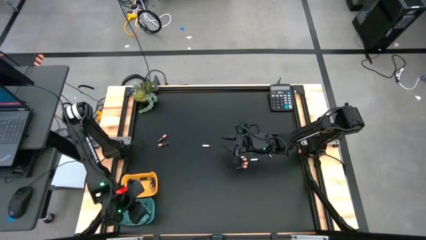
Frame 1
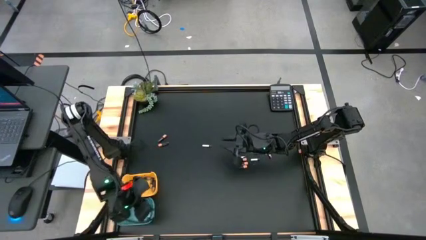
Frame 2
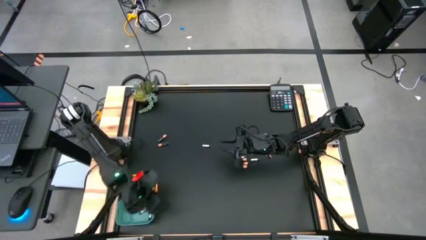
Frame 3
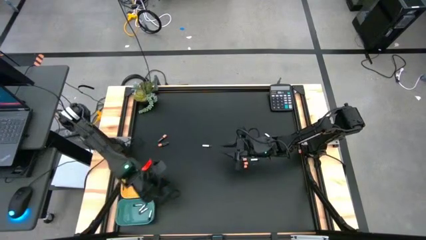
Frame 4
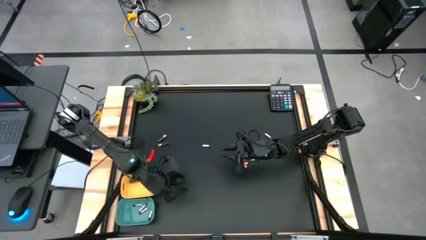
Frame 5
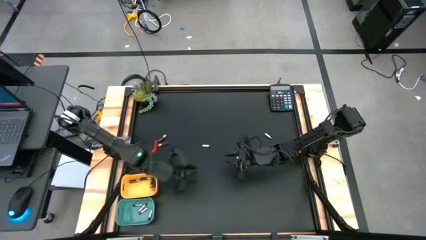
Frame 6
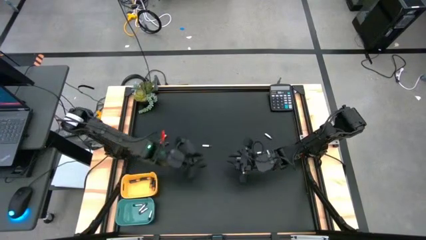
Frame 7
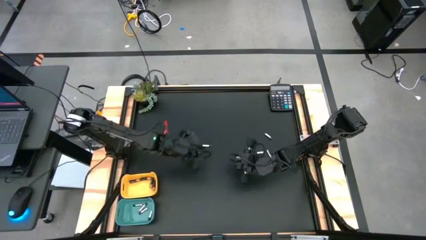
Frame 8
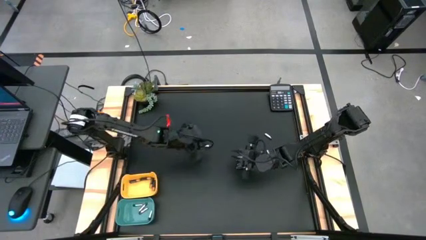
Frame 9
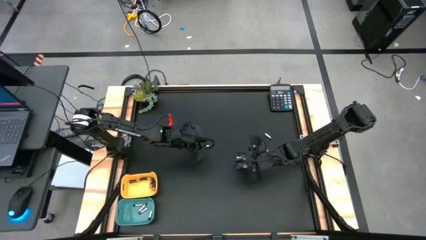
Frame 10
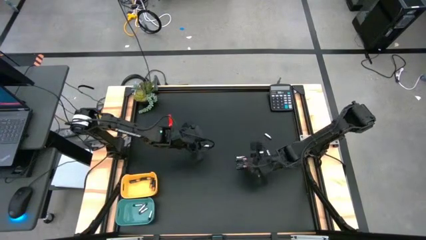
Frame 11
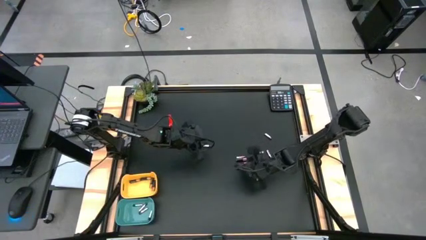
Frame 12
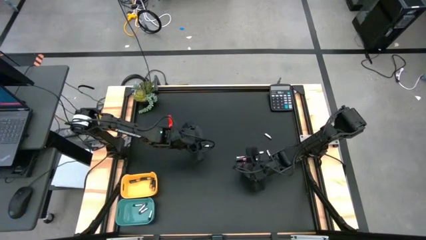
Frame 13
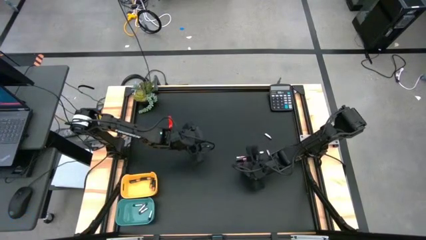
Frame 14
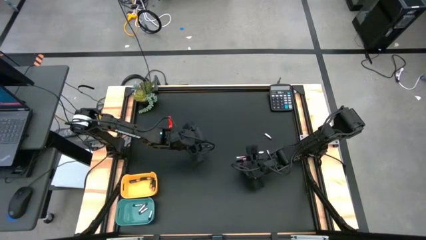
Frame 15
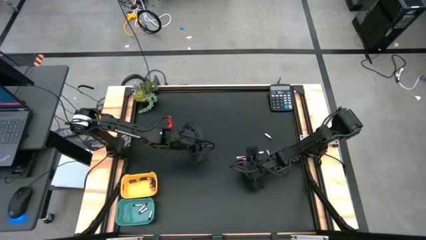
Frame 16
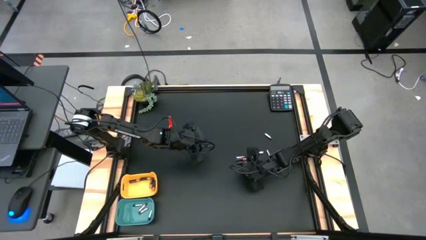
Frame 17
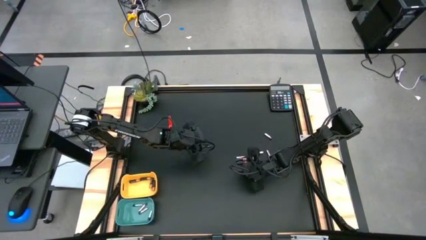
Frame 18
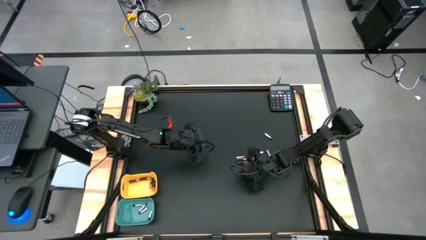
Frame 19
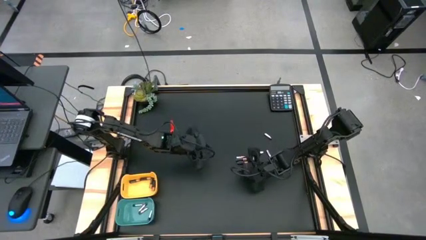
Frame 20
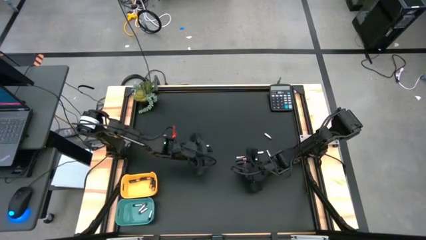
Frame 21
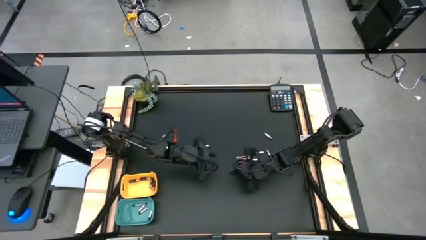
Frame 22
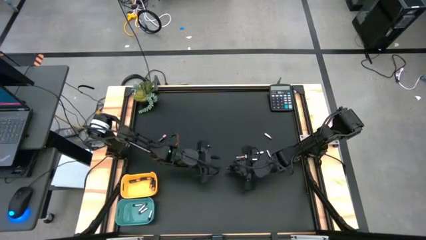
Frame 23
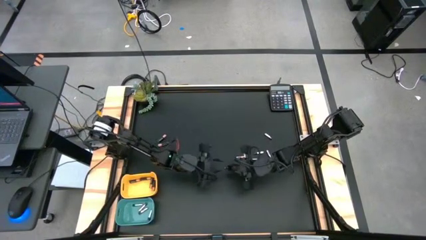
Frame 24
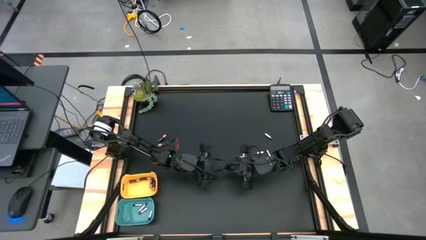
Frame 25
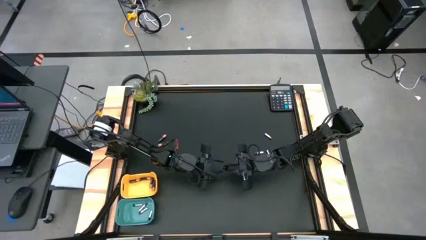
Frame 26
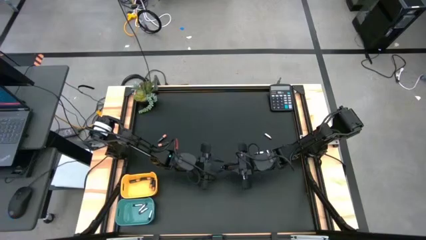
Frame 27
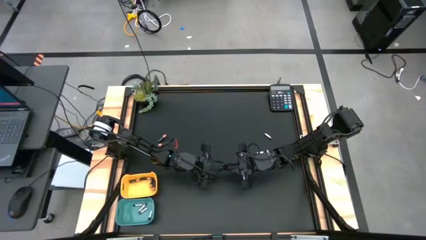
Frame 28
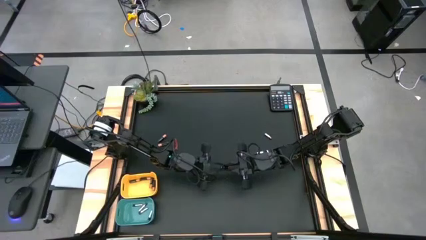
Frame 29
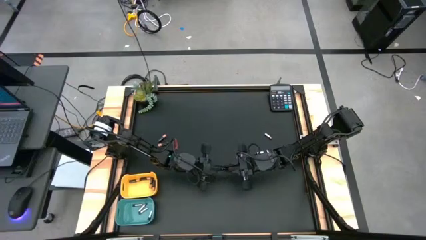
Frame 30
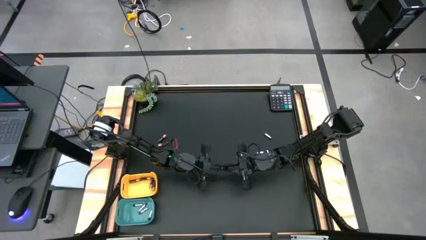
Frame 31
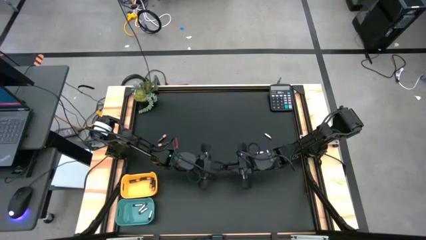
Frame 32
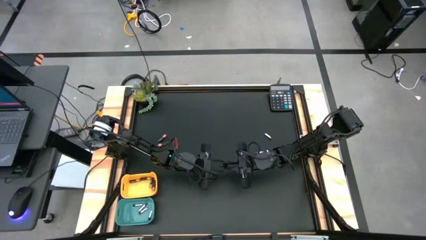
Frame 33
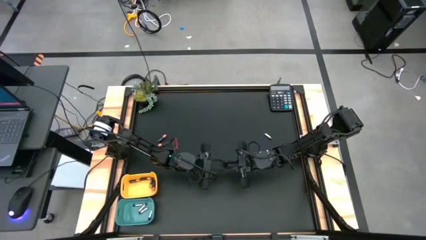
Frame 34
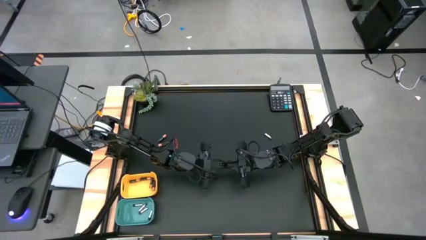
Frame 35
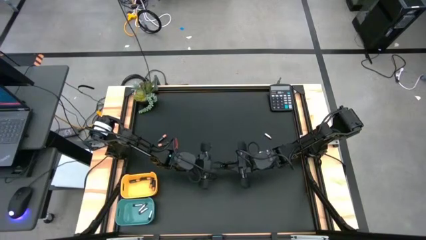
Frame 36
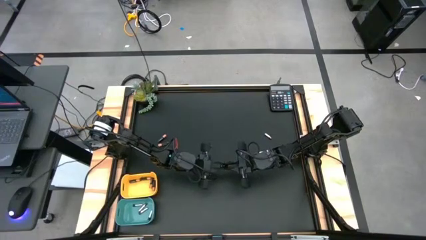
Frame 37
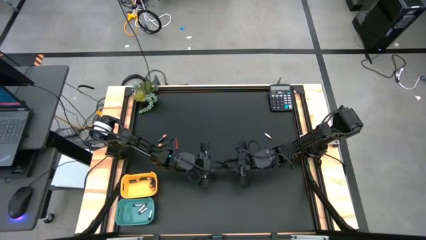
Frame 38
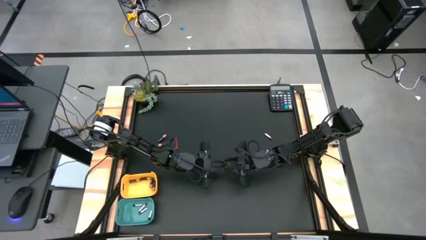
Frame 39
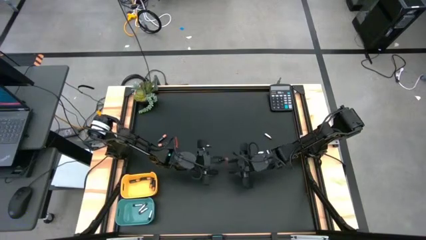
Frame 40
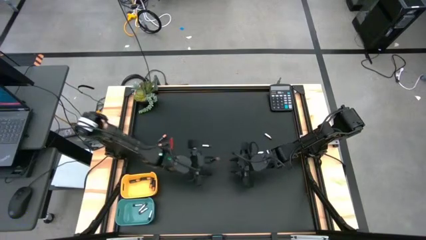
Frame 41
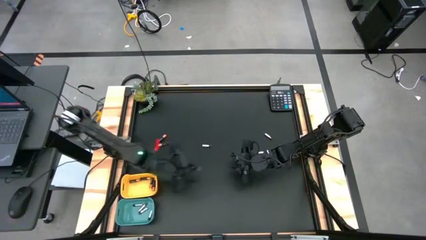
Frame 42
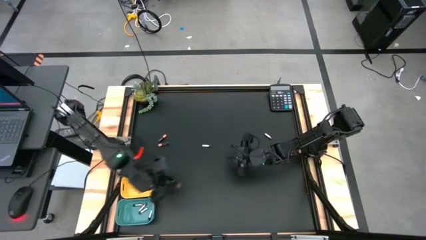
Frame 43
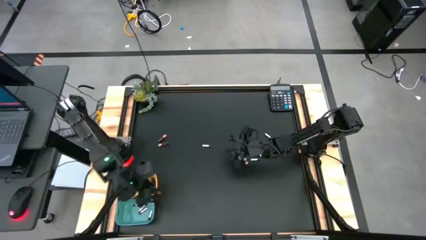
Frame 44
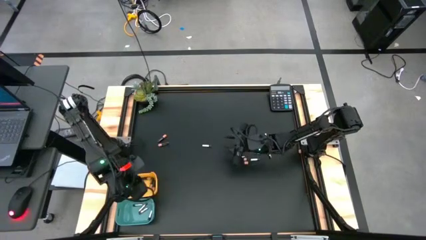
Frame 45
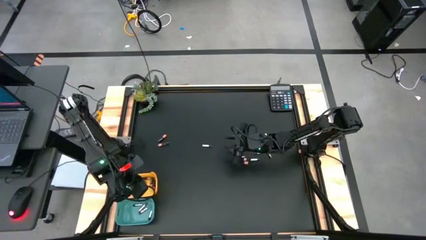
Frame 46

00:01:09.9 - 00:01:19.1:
Task: Sort batteries
Put the black battery into the yellow bin

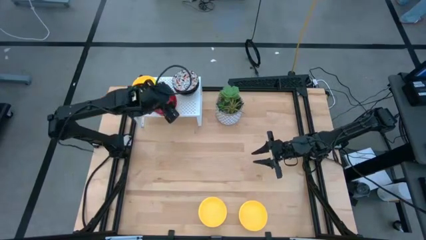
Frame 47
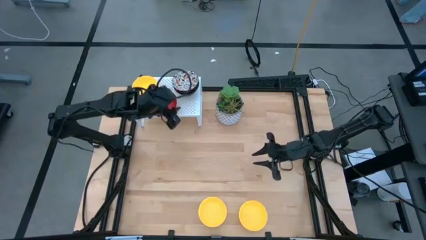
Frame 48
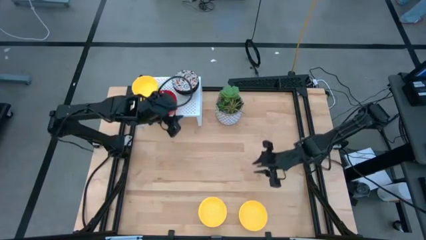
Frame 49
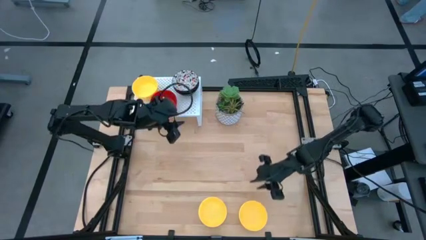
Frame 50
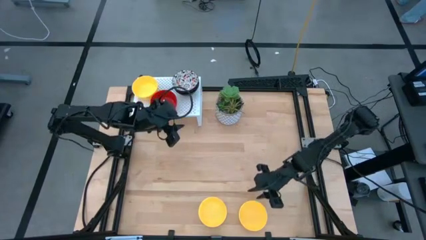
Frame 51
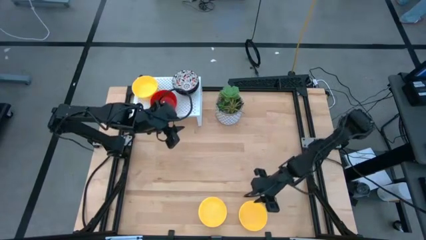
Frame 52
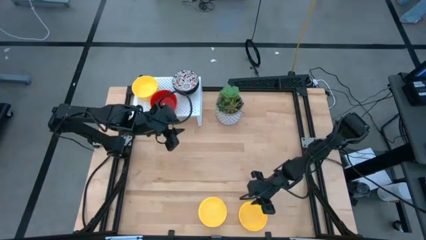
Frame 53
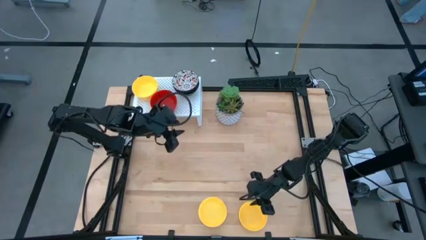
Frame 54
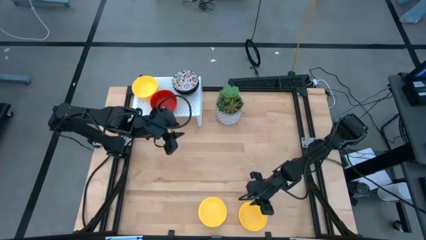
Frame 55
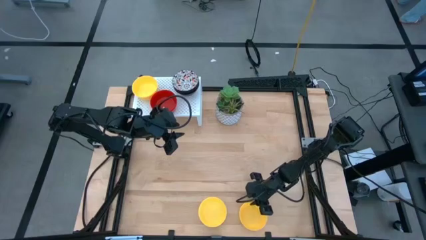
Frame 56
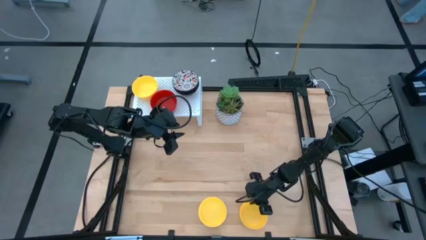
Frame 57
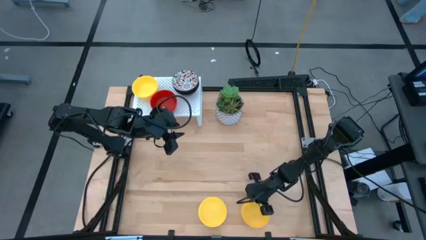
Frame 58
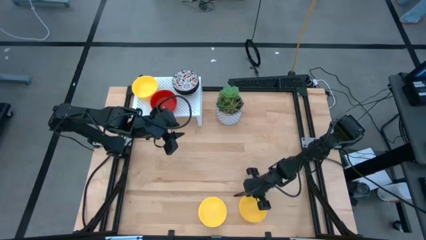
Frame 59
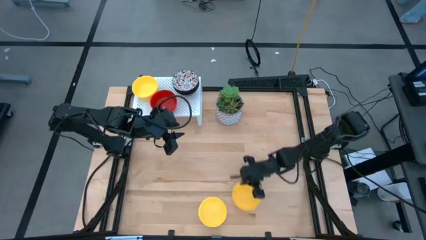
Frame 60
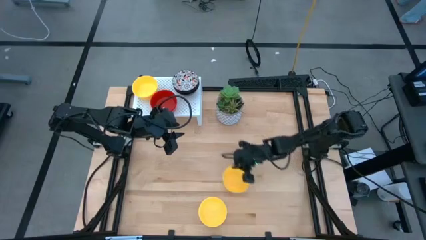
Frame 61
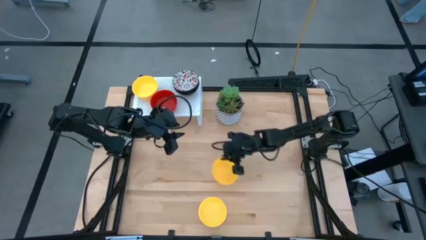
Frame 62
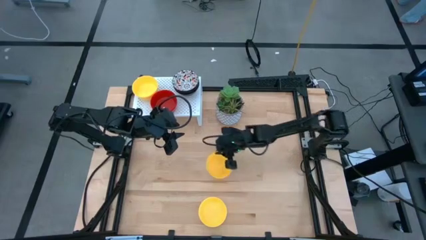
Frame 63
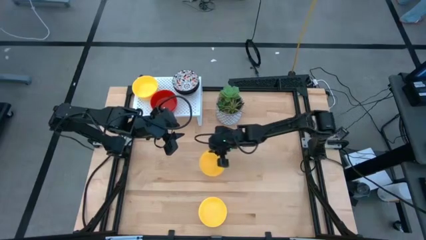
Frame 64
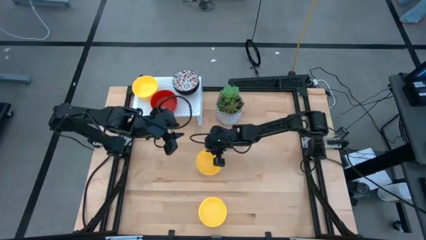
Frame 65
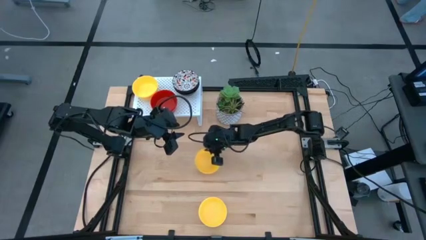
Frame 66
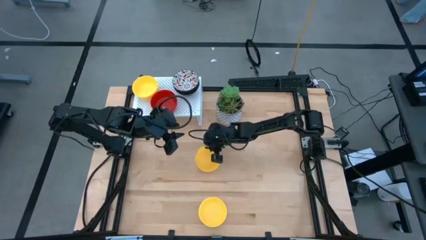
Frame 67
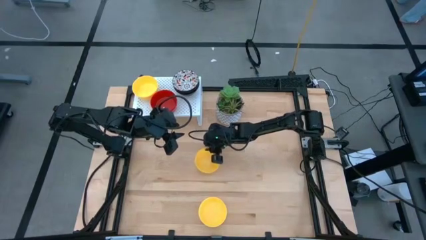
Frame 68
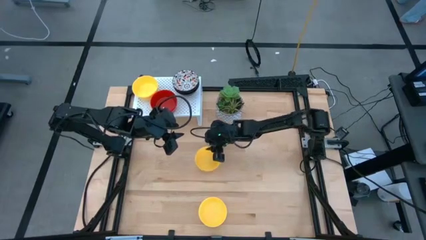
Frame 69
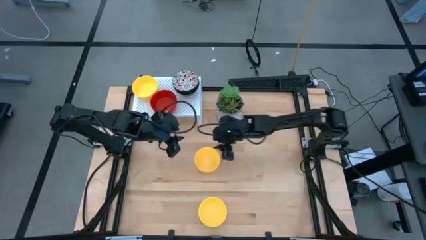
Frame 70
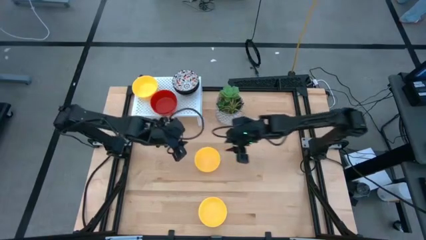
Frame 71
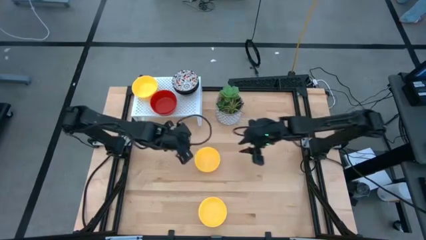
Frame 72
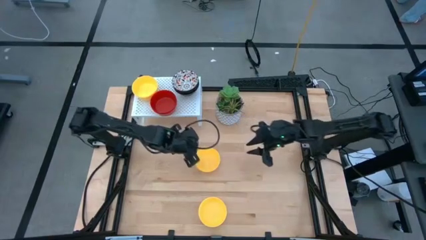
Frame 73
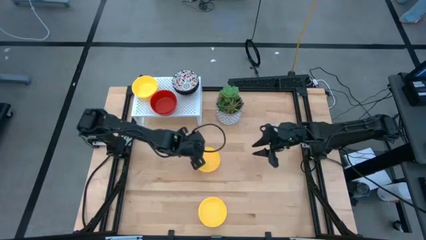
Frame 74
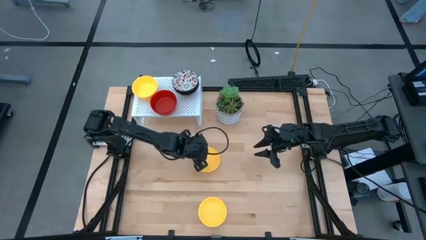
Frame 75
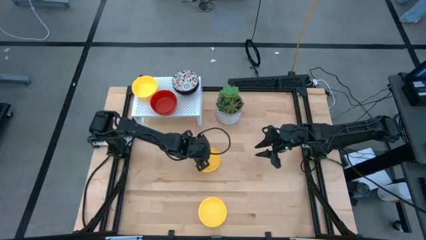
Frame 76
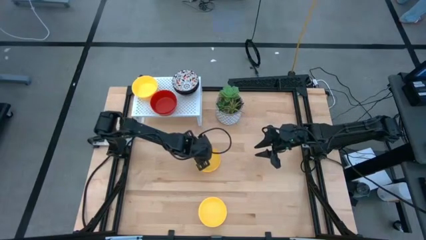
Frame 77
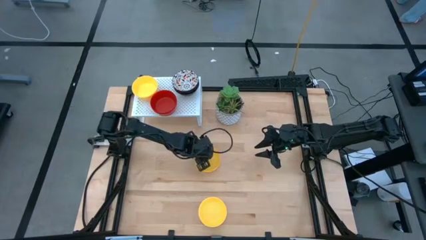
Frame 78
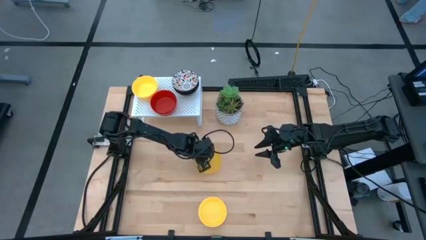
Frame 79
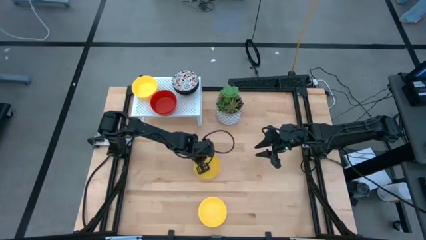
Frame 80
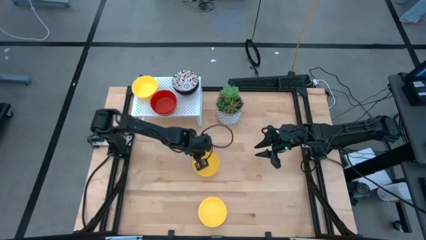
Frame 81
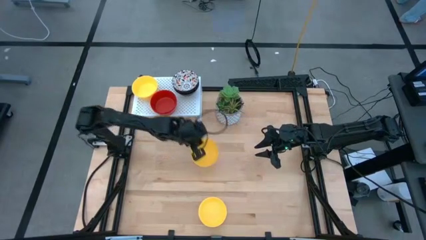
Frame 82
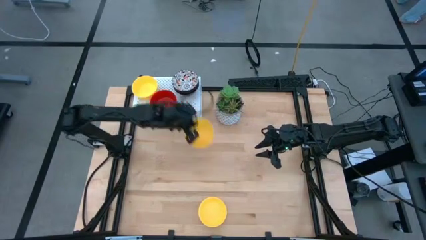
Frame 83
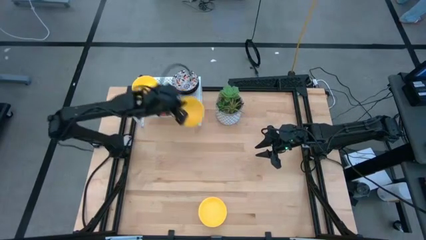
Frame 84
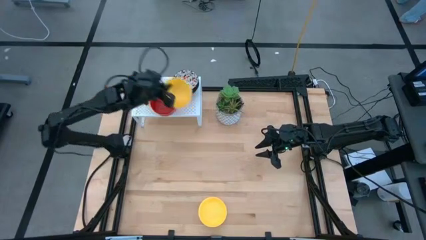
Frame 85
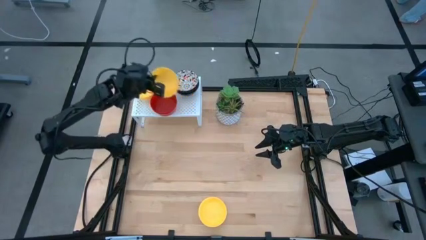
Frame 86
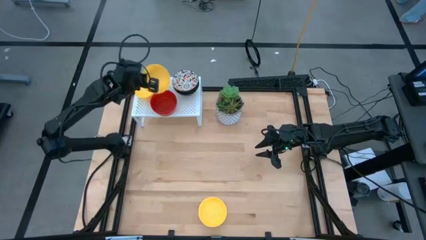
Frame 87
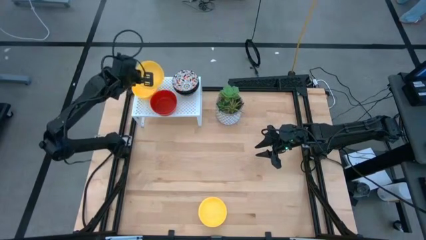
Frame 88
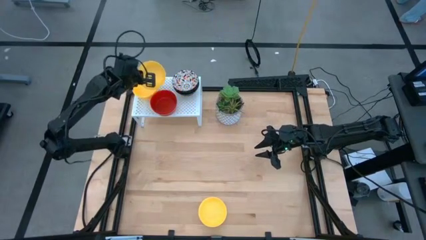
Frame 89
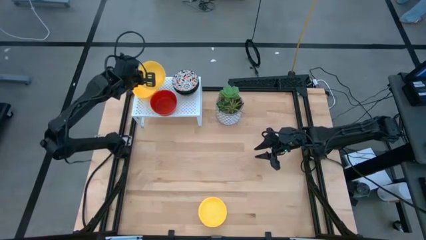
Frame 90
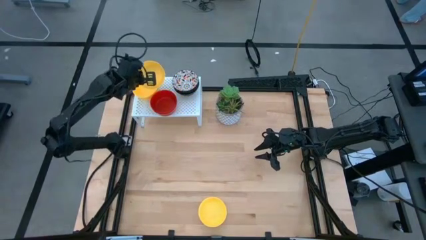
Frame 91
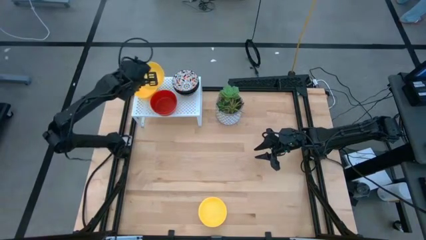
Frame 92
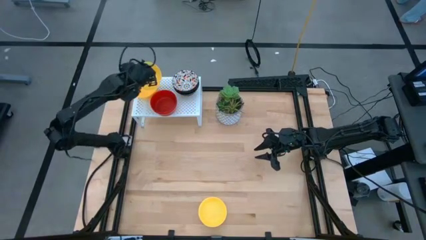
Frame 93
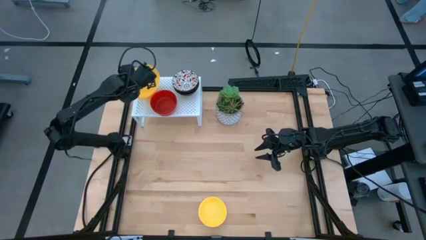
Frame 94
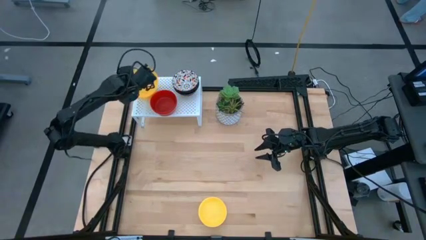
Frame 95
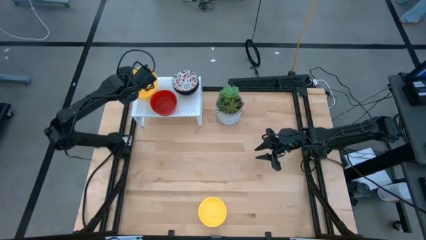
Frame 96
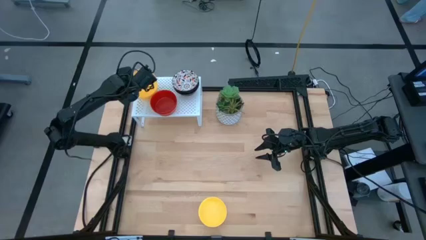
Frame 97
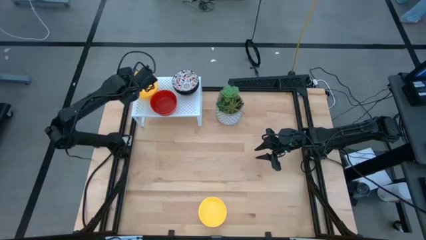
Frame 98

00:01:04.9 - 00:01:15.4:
Task: Pick & Place Mini bowls
Stack the yellow bowl on top of the other yellow bowl on the shelf
